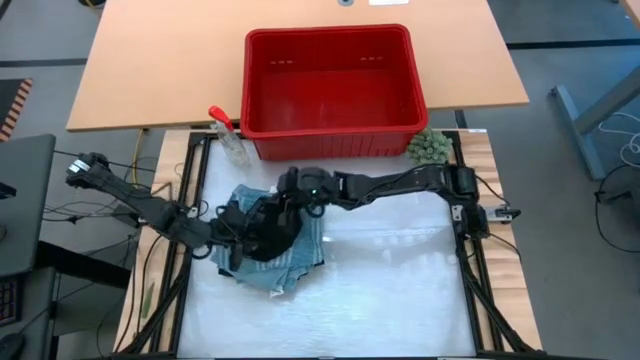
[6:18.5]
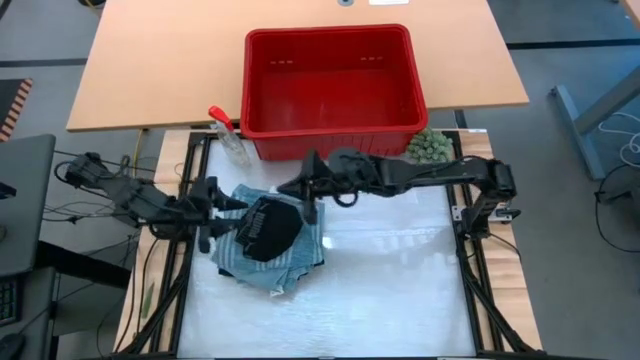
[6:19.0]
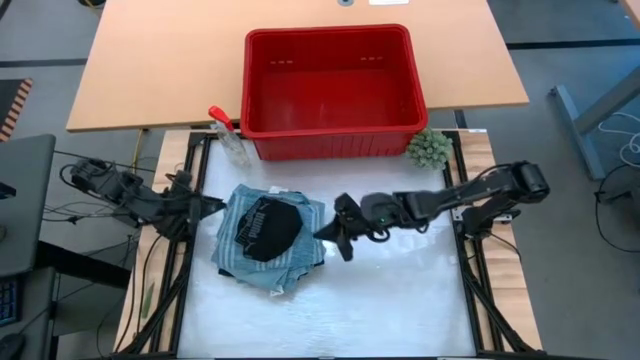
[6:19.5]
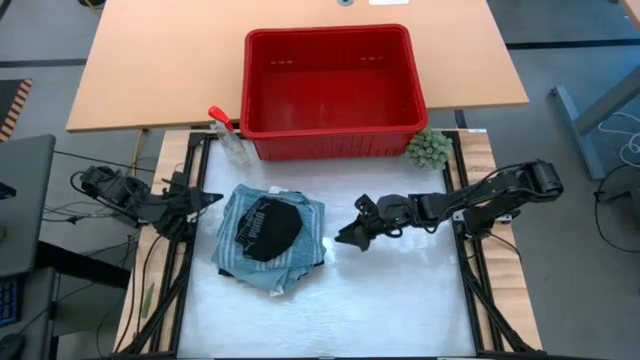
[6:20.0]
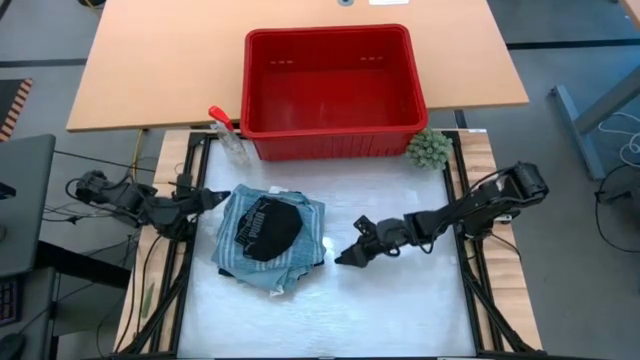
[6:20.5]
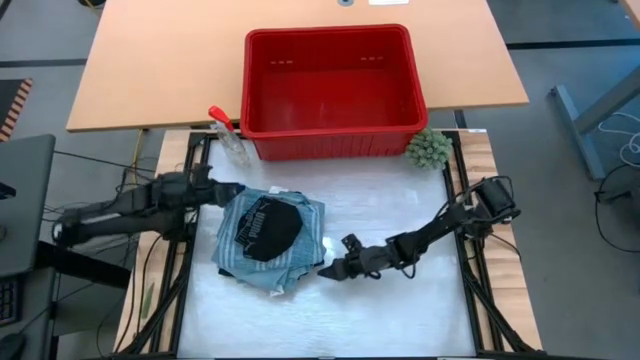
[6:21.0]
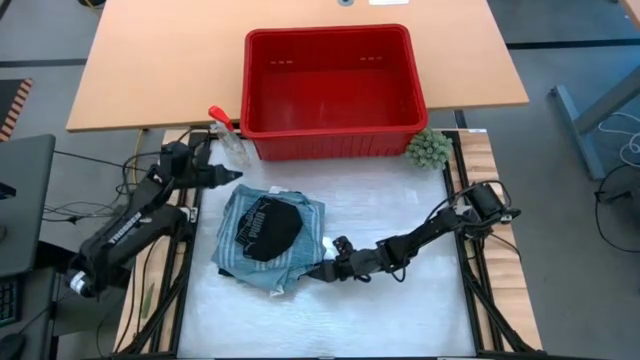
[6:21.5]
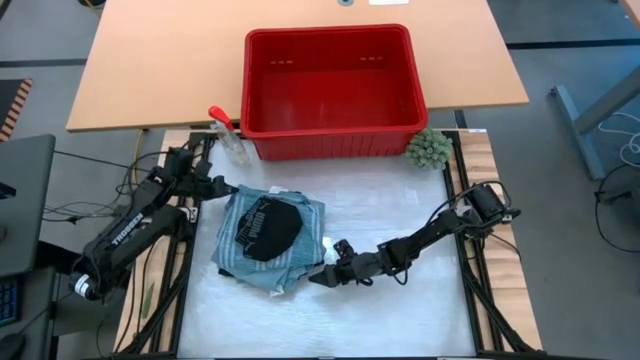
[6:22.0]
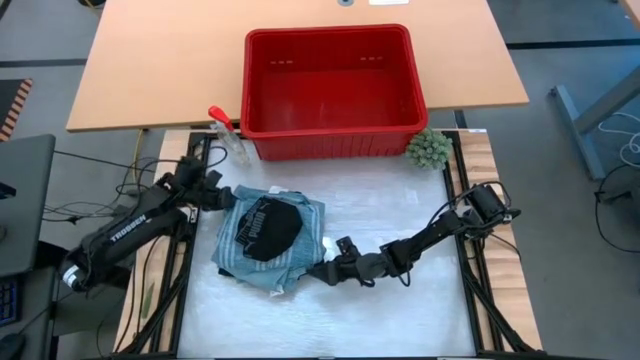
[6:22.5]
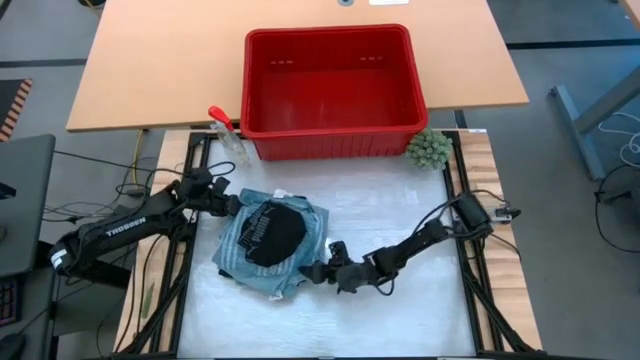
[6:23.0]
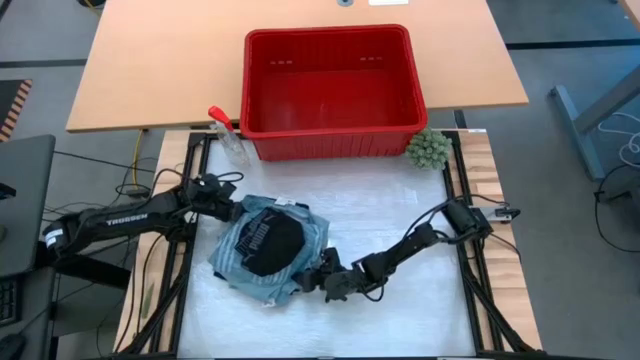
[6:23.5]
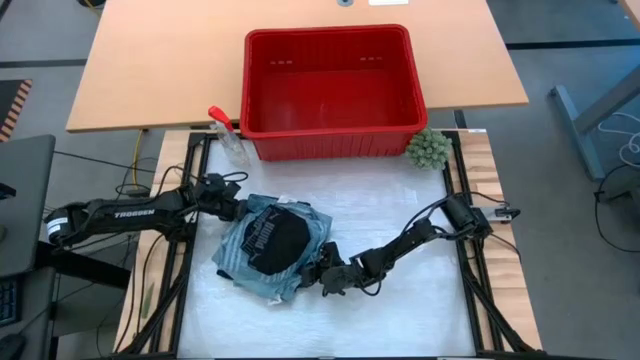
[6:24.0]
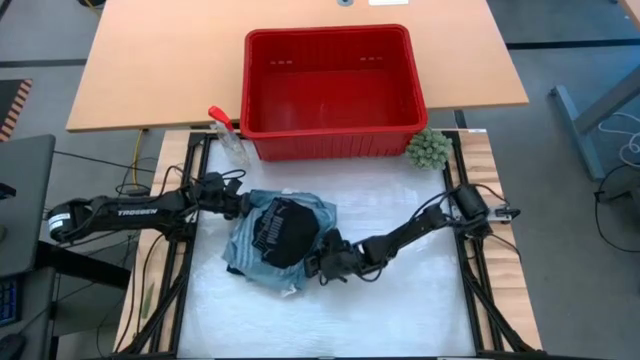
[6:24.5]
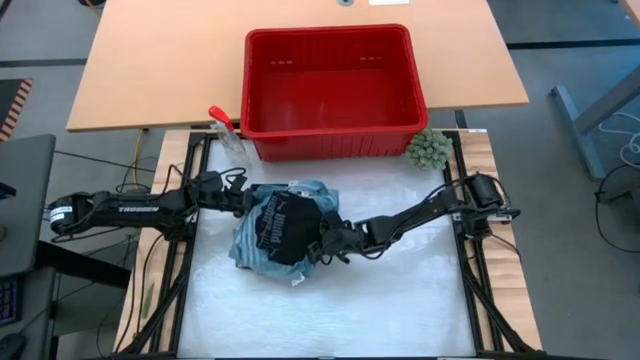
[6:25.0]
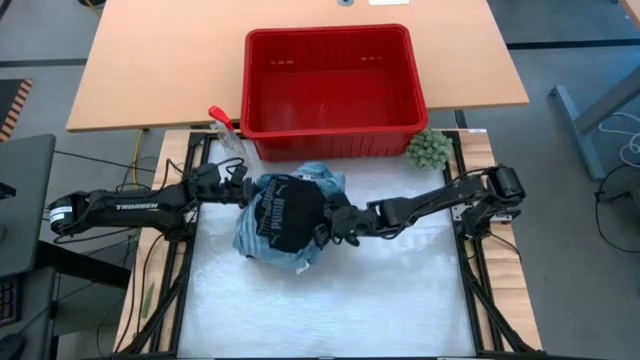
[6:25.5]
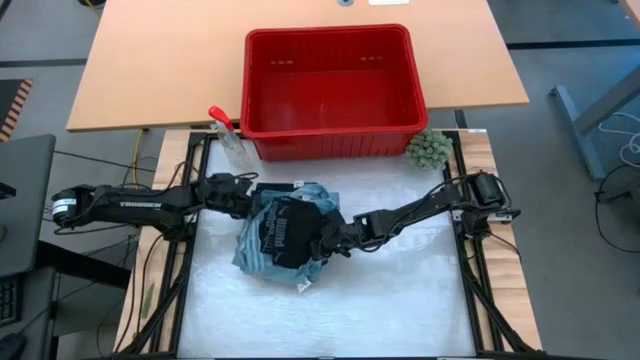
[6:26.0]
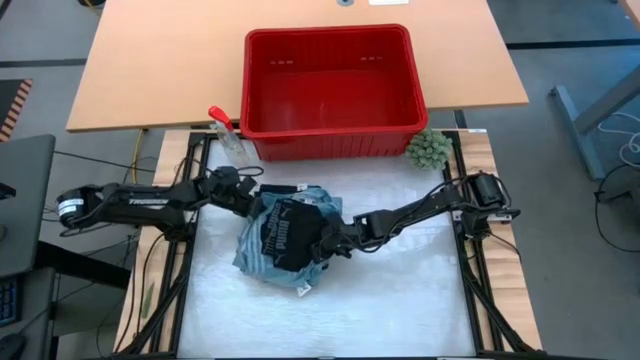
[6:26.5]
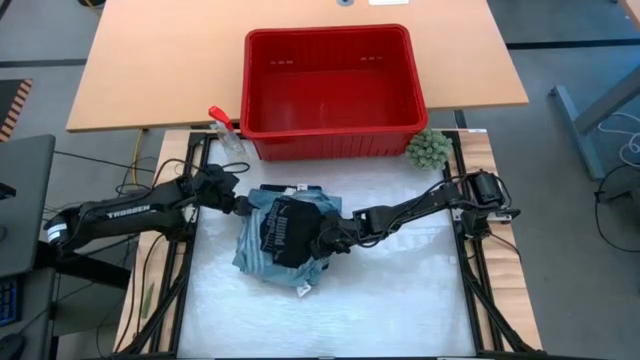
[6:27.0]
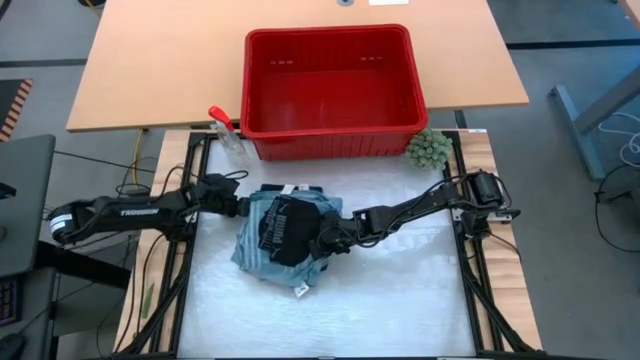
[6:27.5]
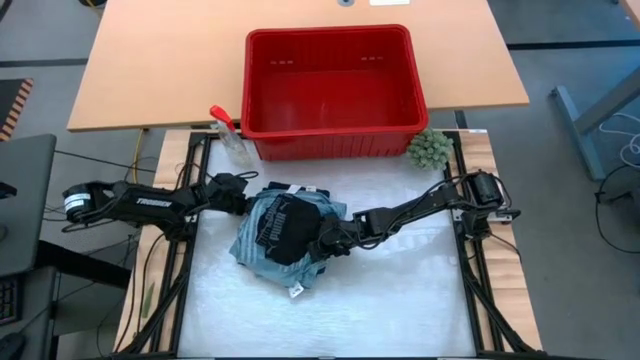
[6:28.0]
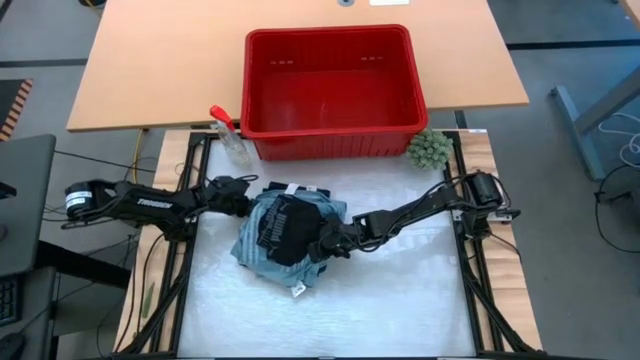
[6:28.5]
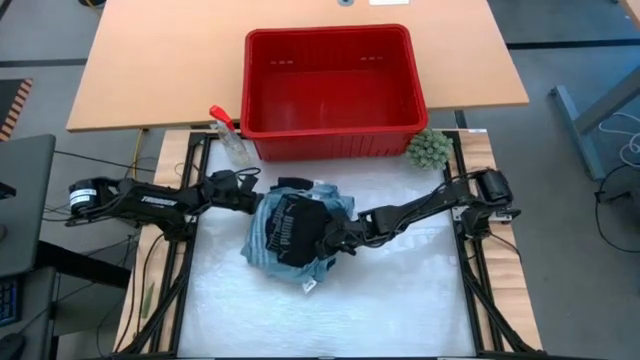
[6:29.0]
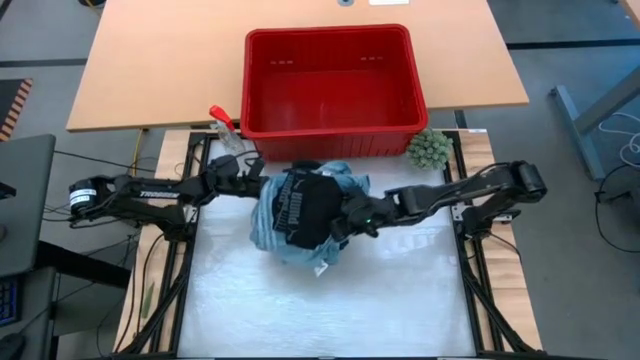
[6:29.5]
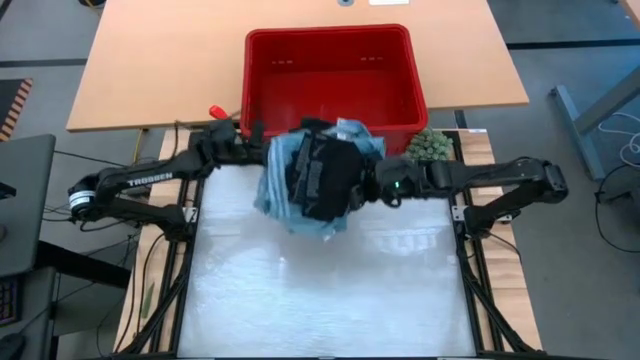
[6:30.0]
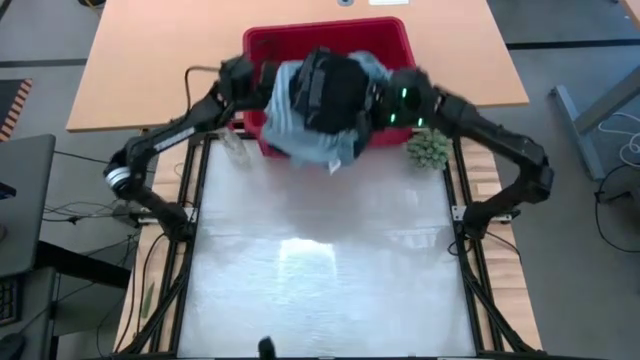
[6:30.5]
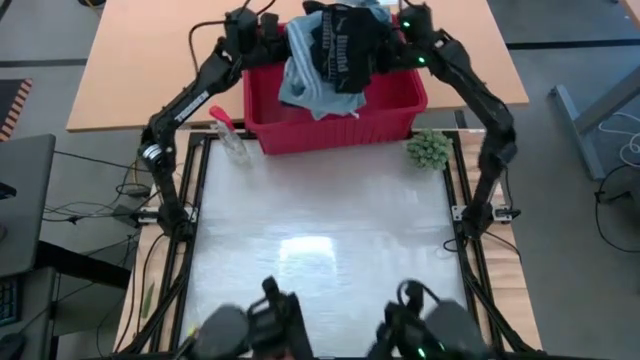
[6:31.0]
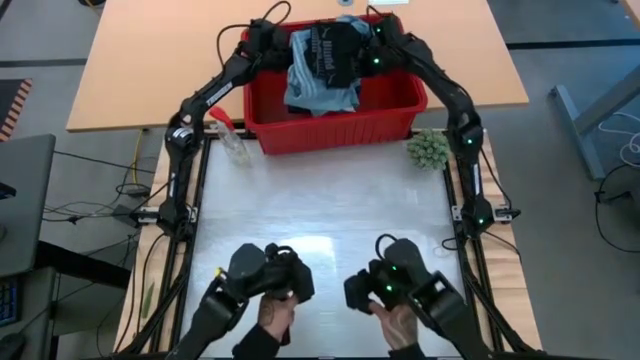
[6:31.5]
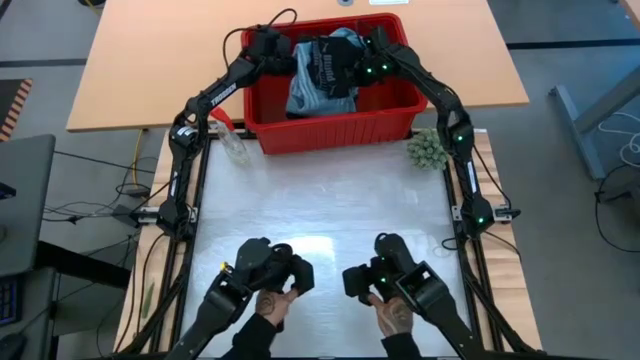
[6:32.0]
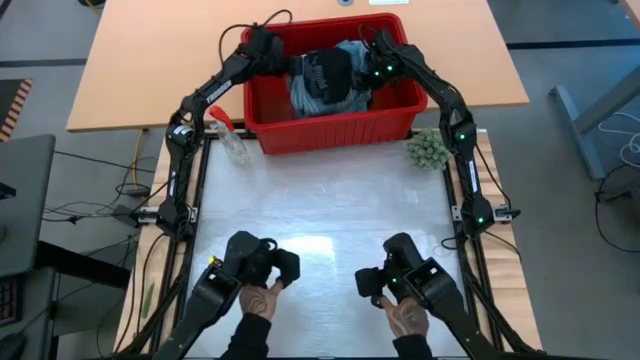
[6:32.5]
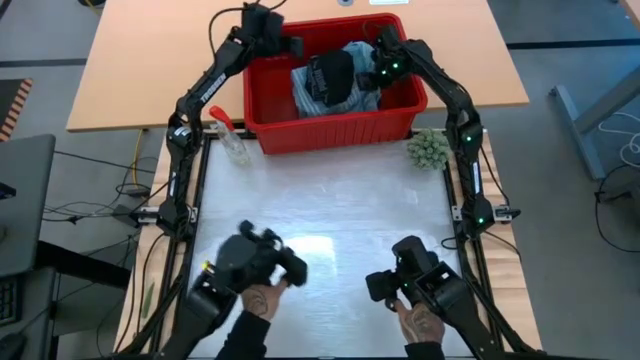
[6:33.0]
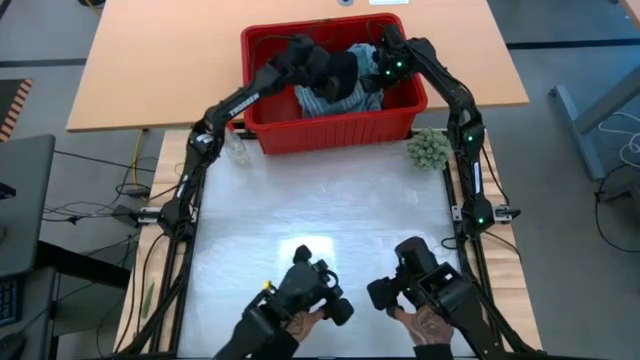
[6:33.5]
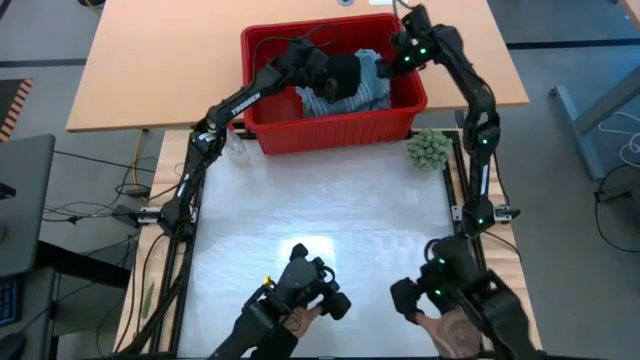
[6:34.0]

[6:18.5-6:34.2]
Task: Fold Laundry from Bin
Put the stacked clothes into the red laundry bin

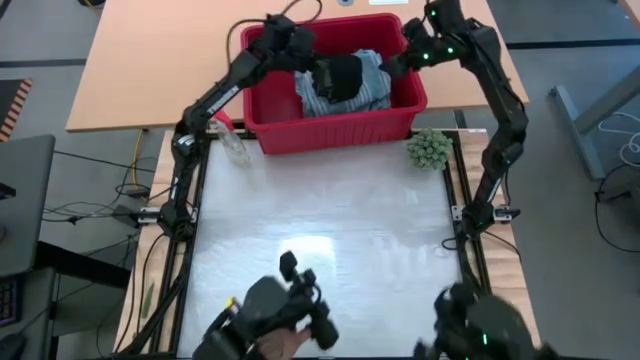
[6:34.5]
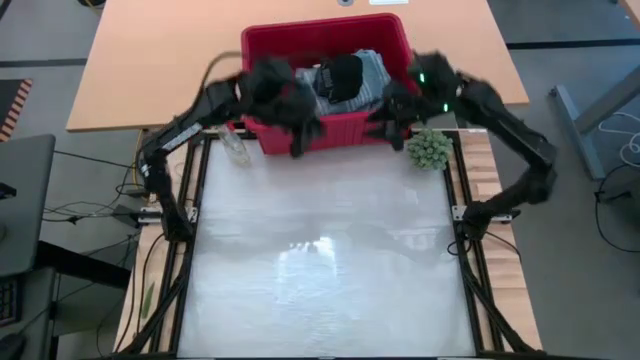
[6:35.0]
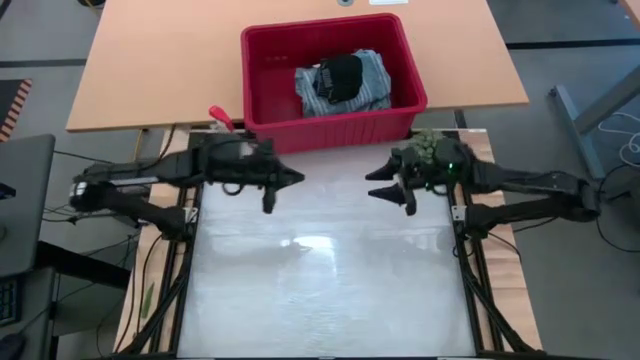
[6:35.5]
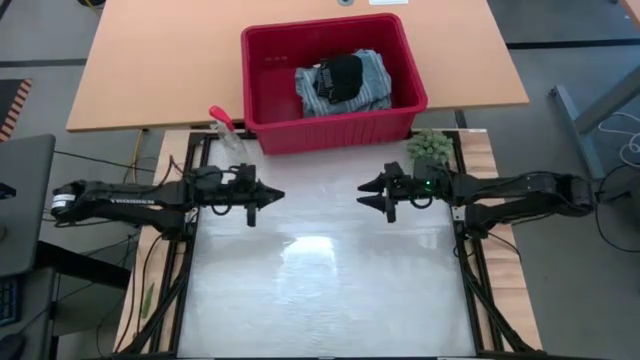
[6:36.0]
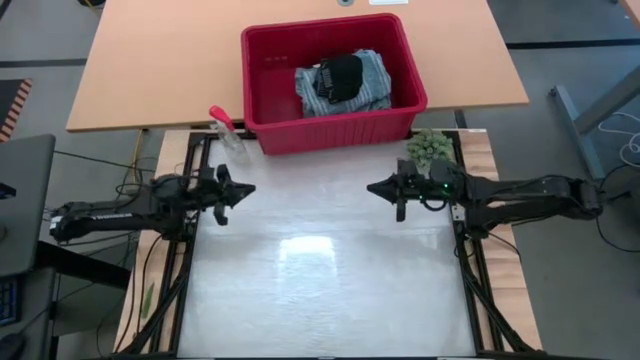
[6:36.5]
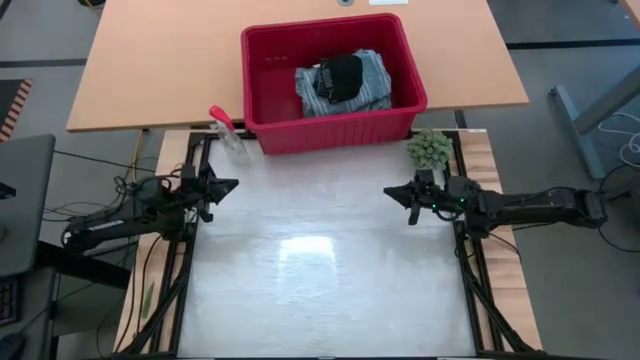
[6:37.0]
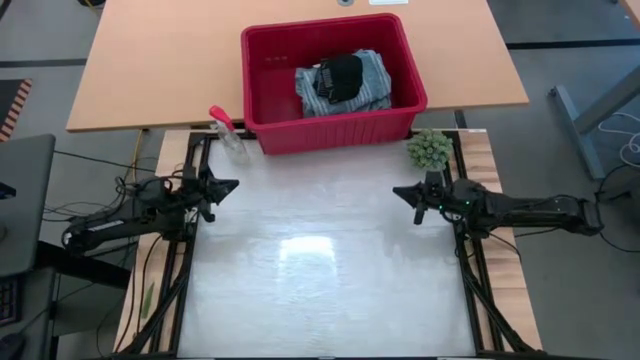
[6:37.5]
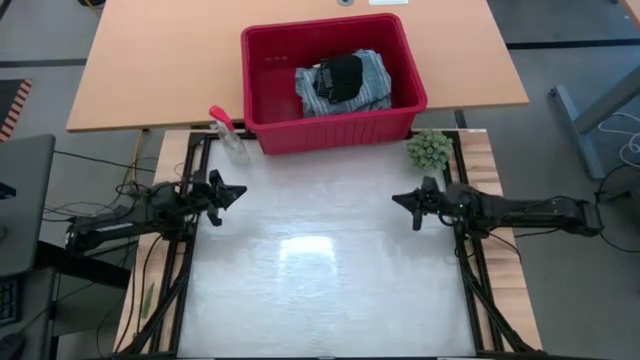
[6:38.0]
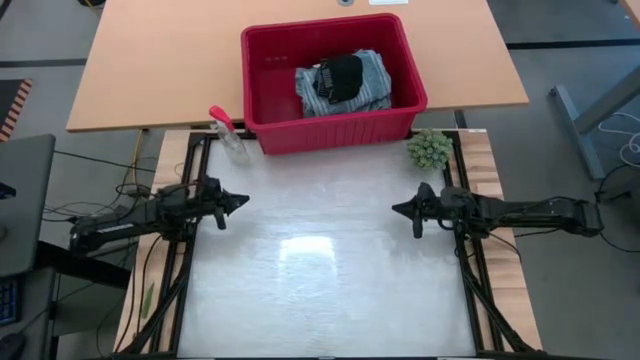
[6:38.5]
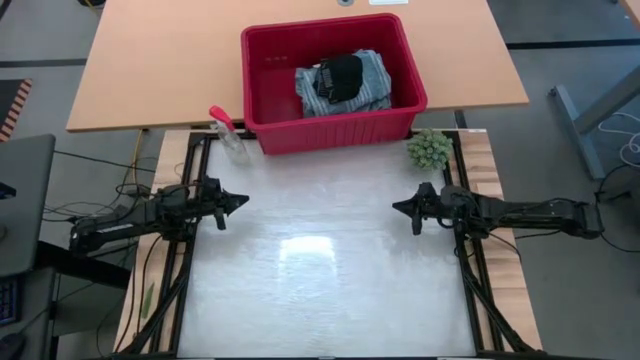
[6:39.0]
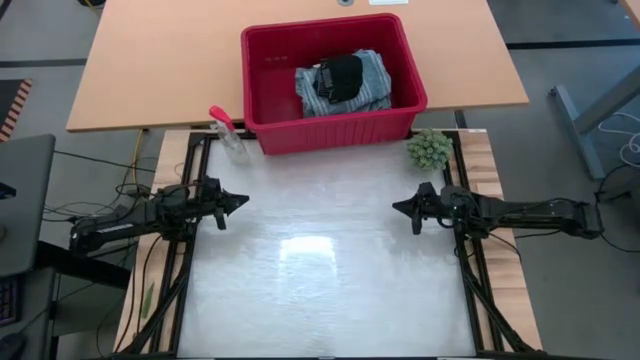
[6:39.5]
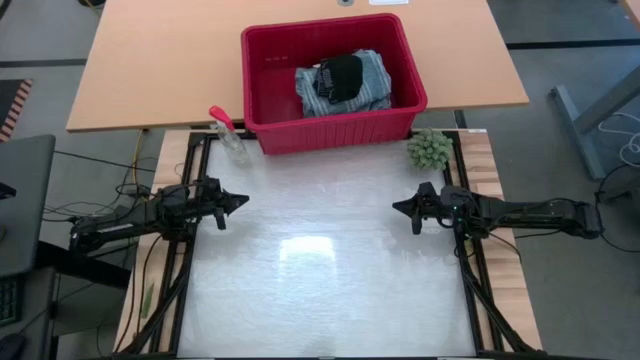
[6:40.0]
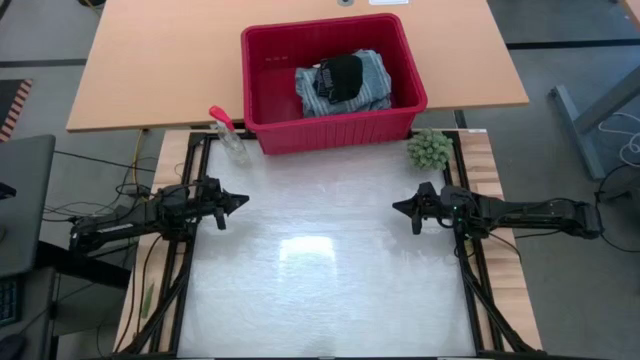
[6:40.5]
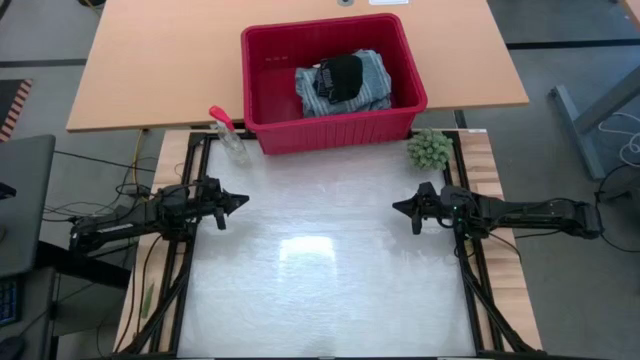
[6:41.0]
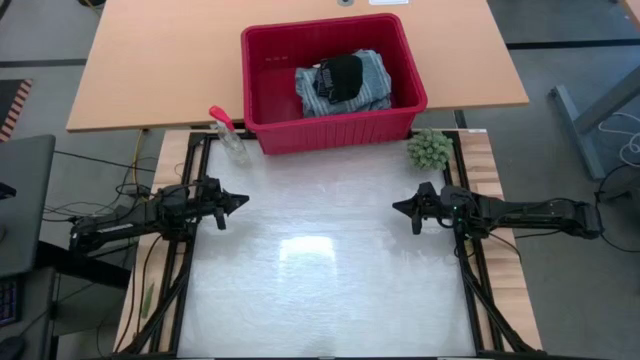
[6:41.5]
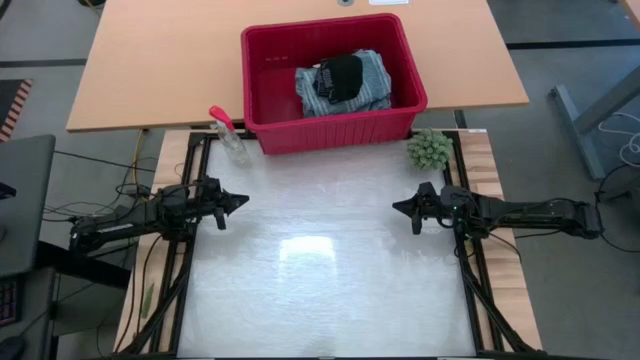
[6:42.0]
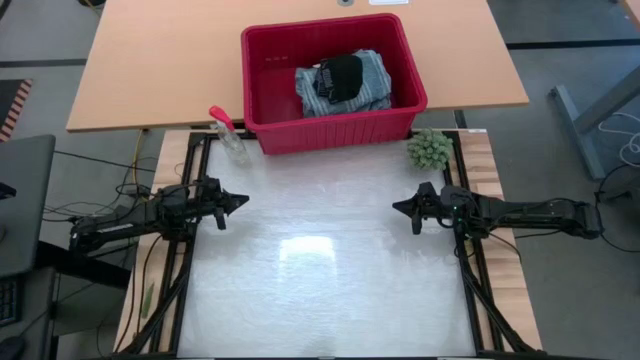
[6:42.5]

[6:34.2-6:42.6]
Return to Home Position
